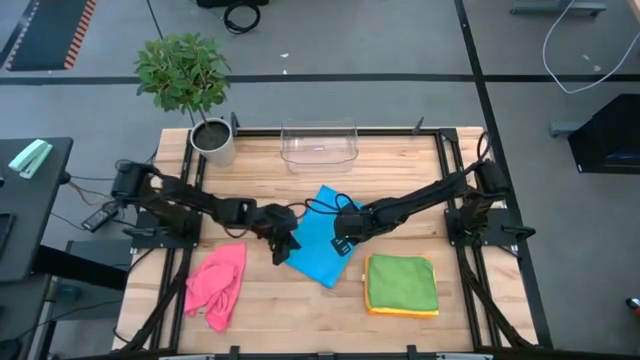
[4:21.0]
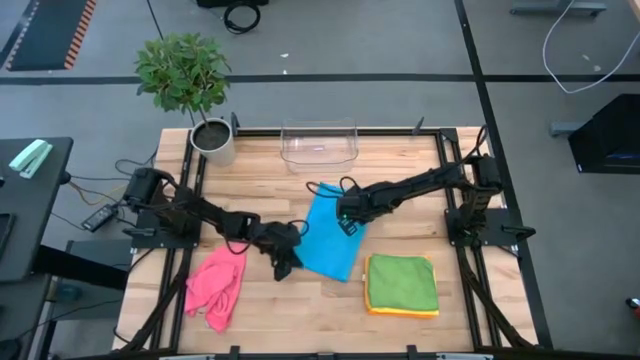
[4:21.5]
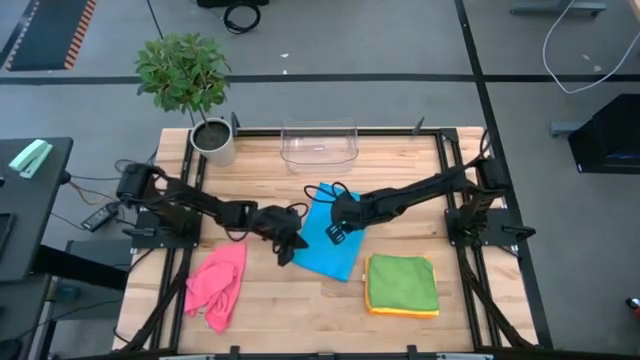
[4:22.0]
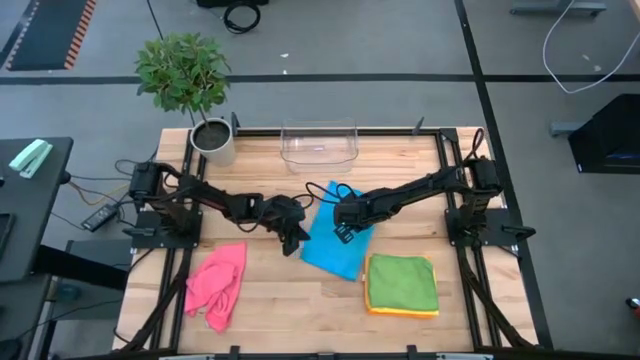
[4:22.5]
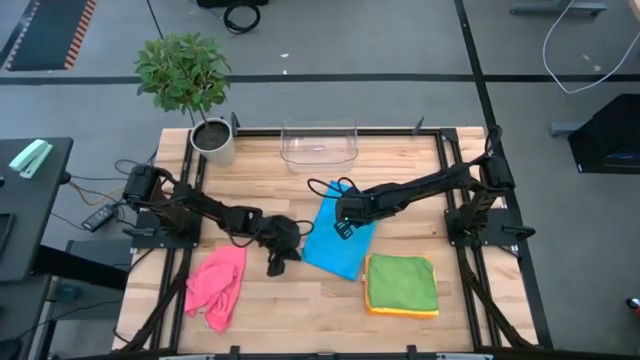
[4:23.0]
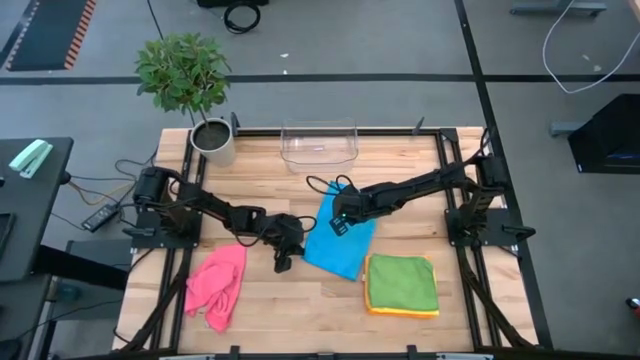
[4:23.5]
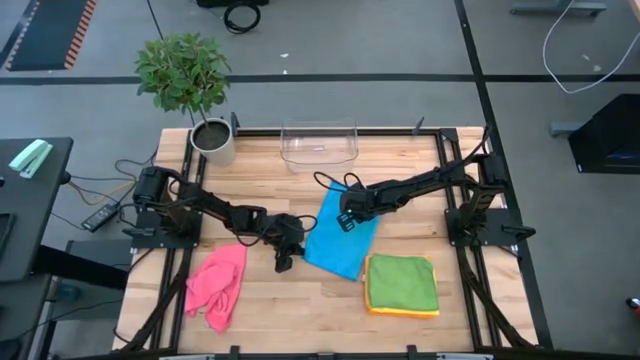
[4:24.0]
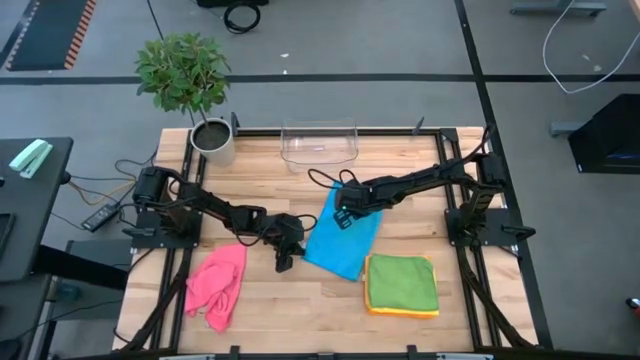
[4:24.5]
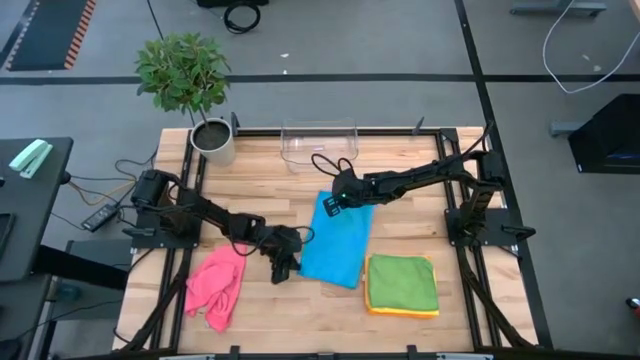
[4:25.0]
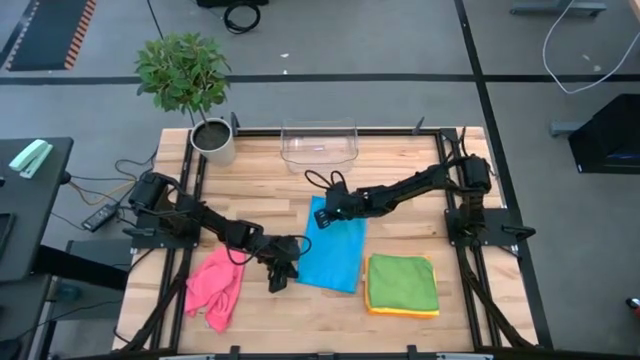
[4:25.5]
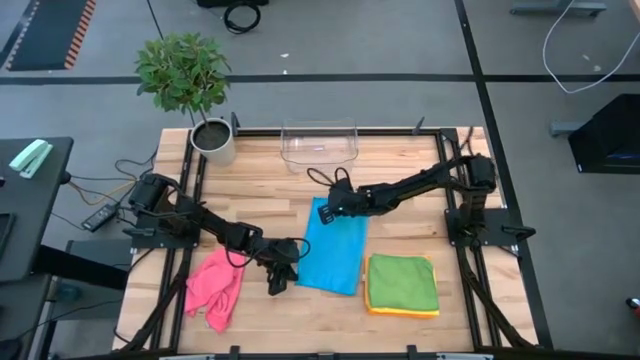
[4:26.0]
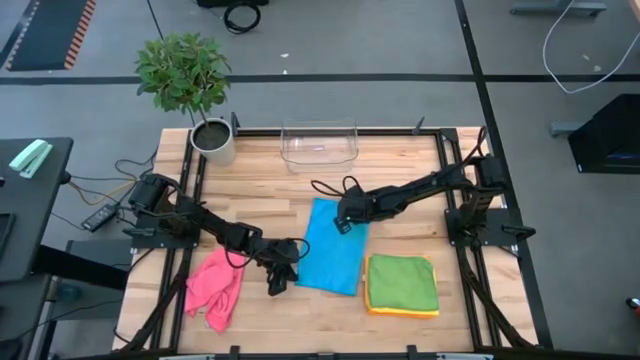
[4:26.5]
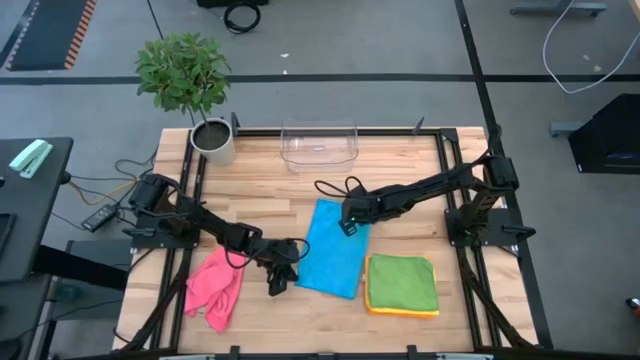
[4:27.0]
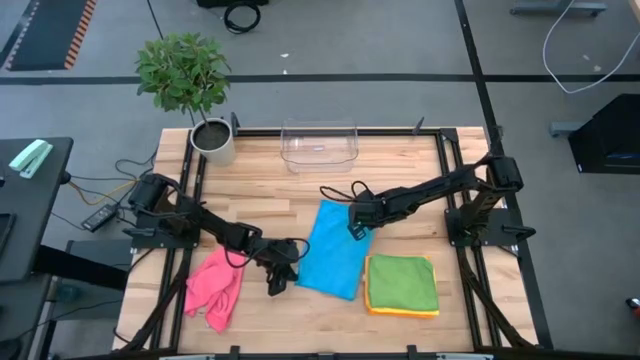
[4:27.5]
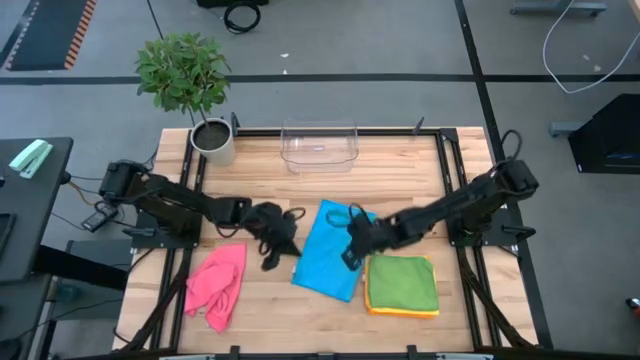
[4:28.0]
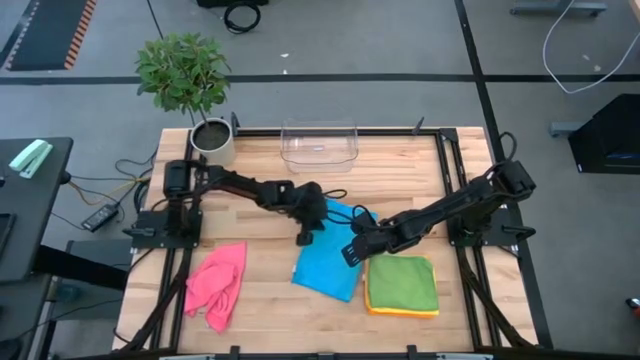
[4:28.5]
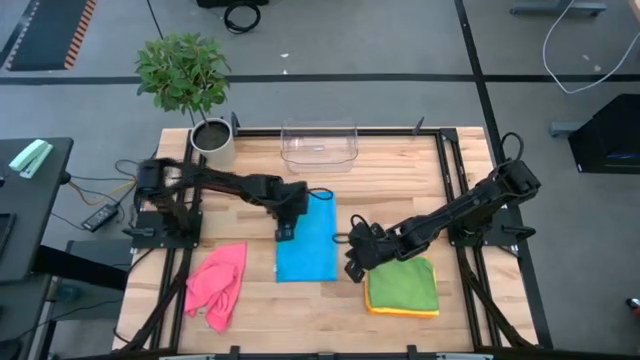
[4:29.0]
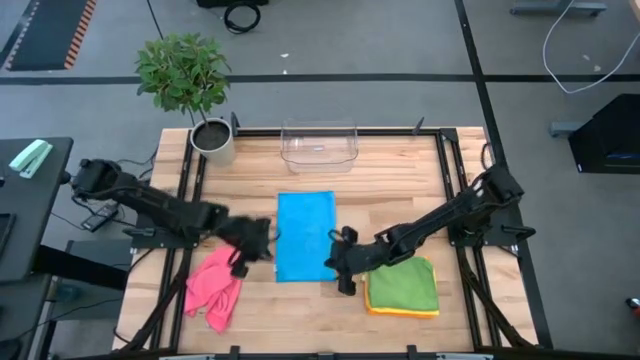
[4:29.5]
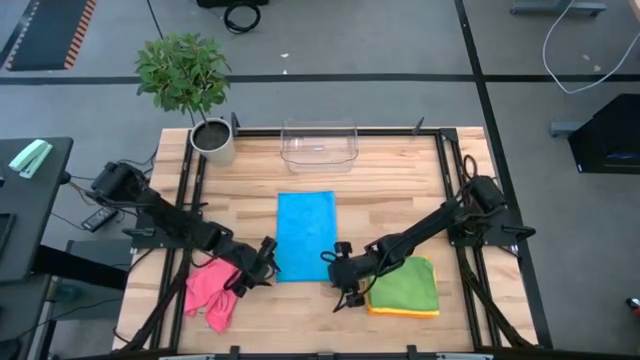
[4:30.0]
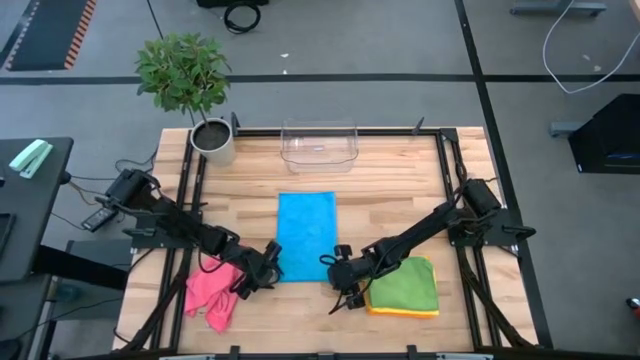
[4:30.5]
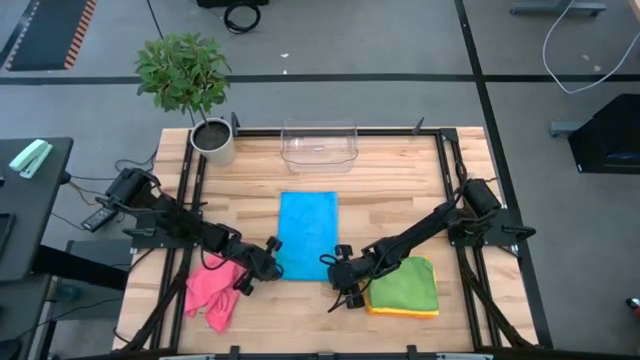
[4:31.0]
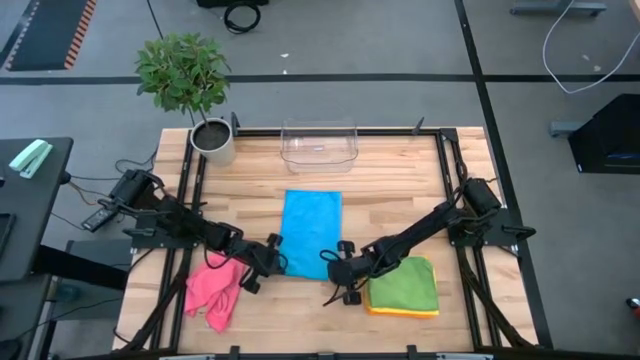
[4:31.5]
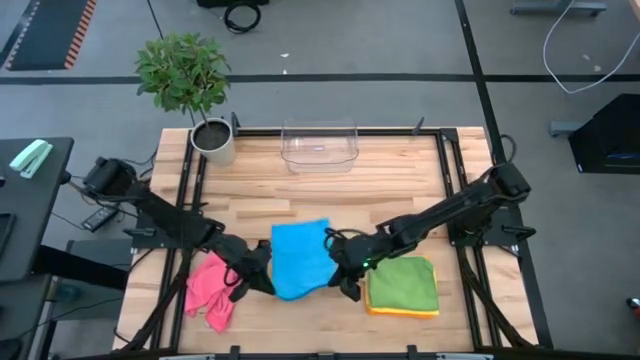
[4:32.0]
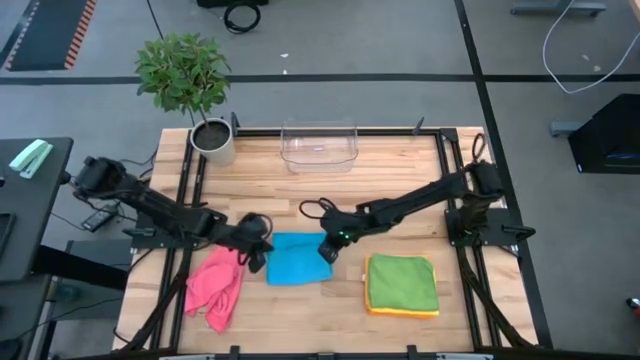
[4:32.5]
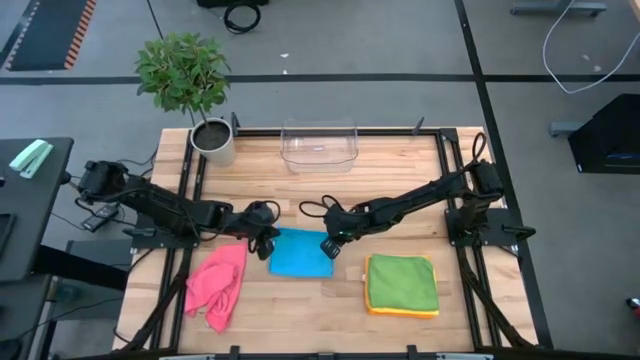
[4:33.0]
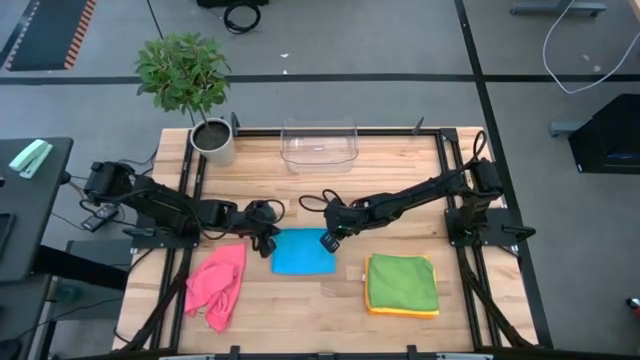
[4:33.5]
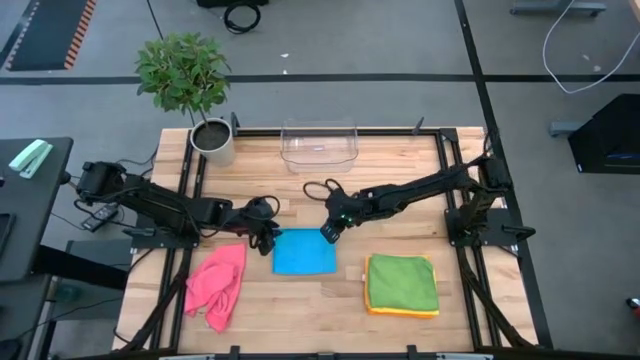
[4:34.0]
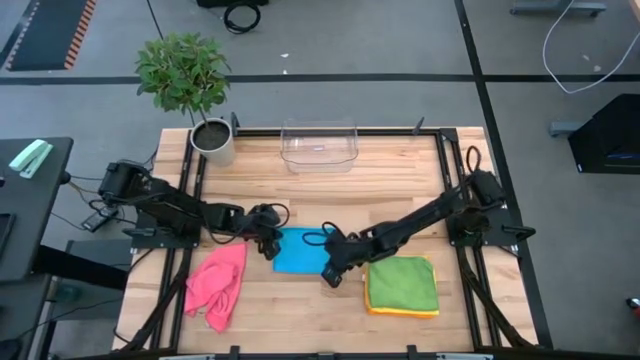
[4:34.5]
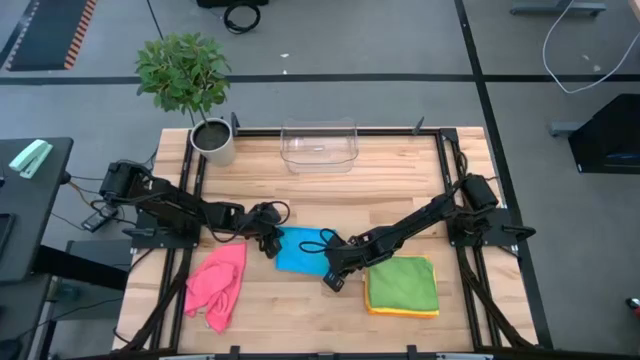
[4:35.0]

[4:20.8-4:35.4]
Task: Fold microfiber towels
Fold the blue towel on the table

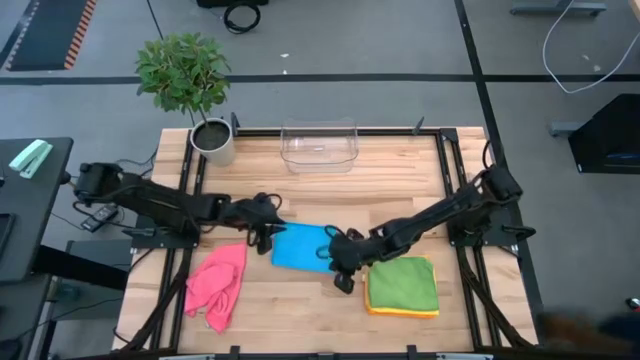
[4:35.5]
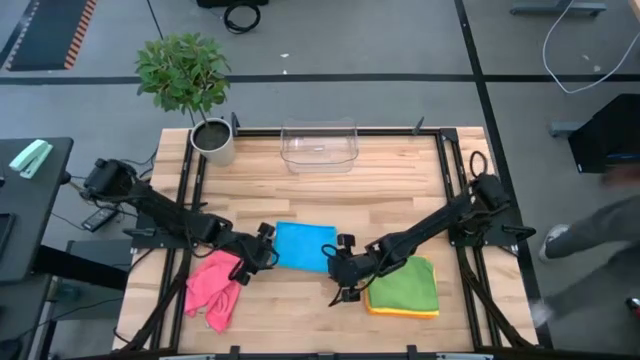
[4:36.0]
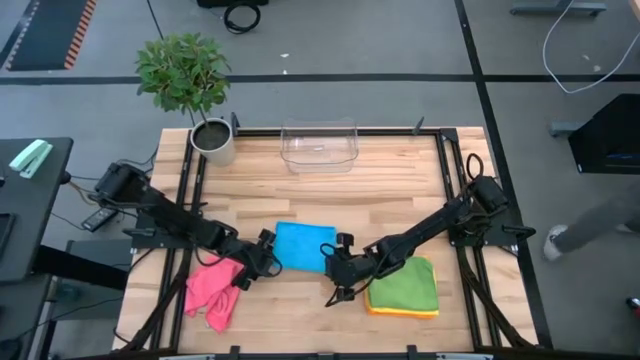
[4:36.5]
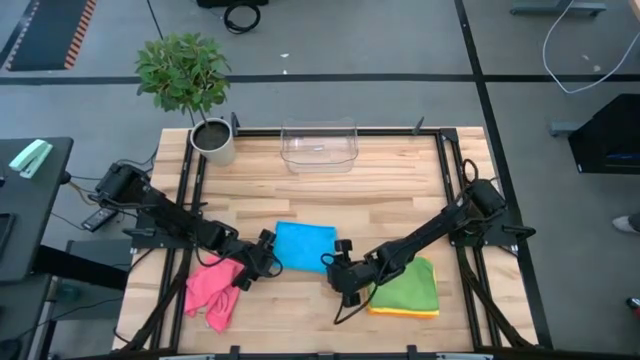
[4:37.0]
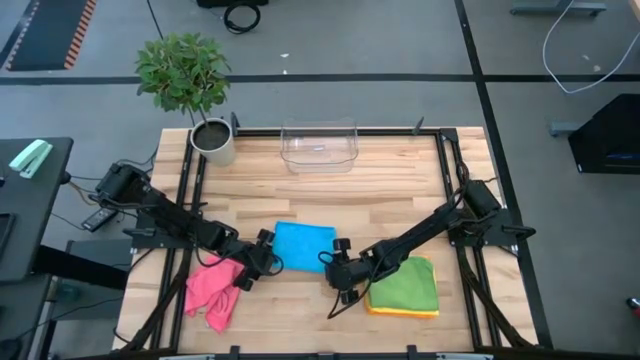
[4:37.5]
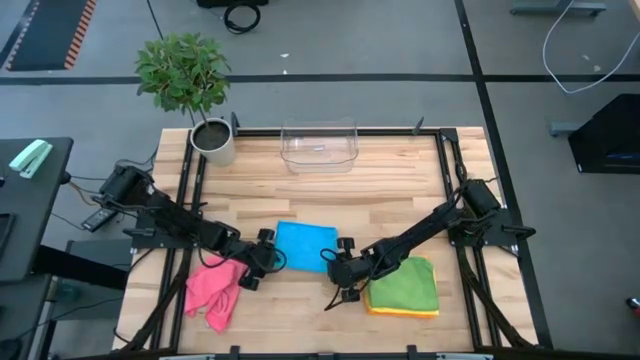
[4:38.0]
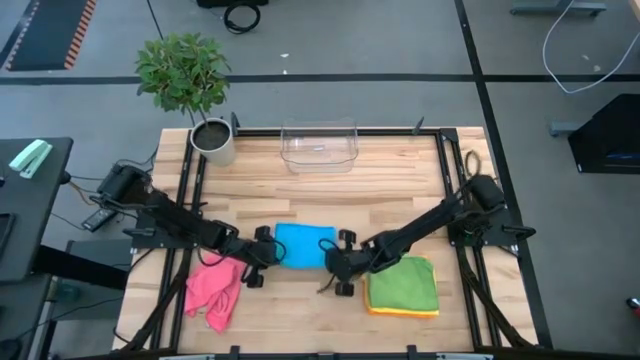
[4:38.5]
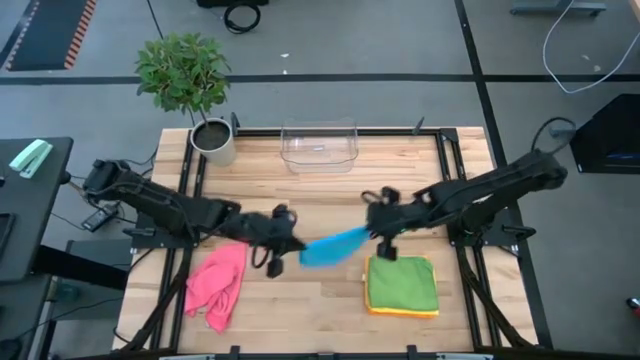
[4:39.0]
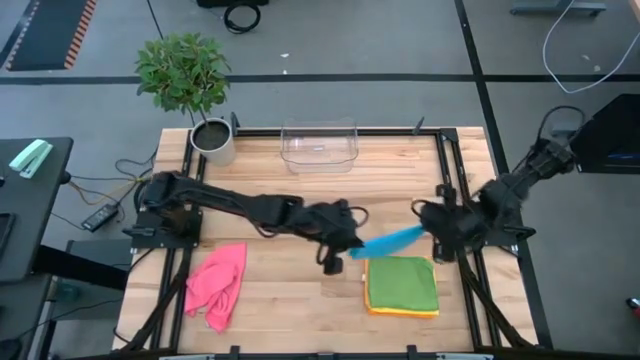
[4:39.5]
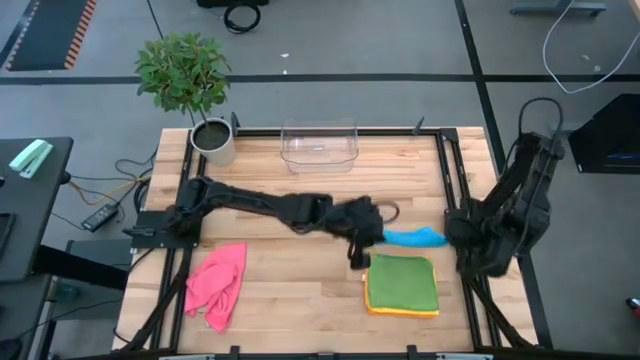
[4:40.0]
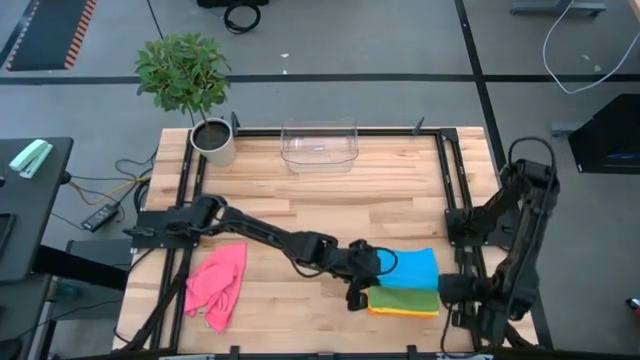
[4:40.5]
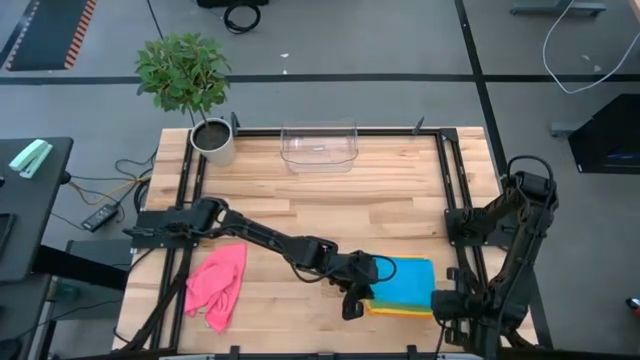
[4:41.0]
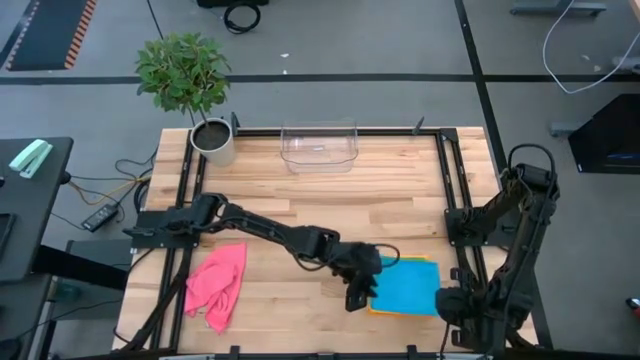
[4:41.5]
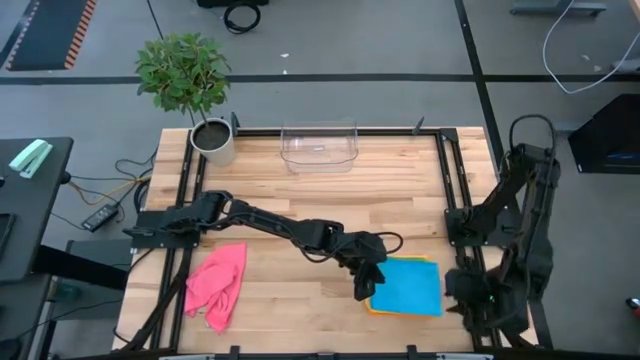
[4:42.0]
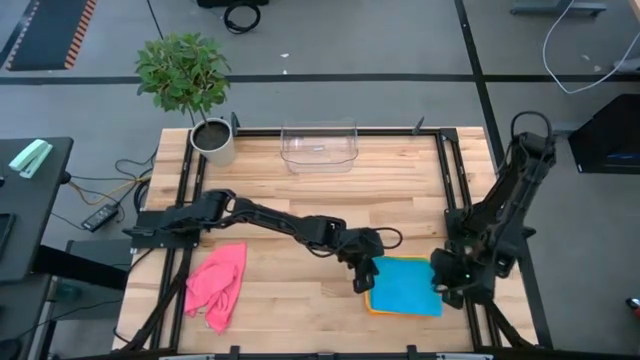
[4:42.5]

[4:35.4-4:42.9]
Stack the blue towel on the green towel
